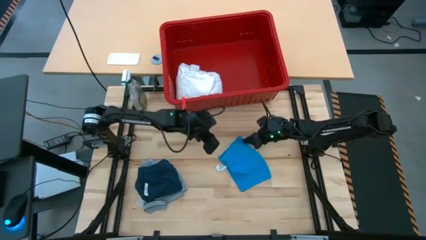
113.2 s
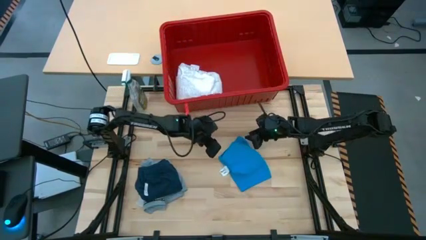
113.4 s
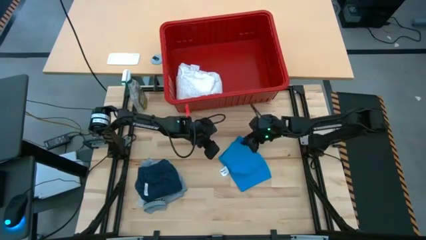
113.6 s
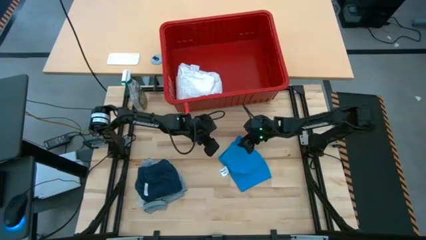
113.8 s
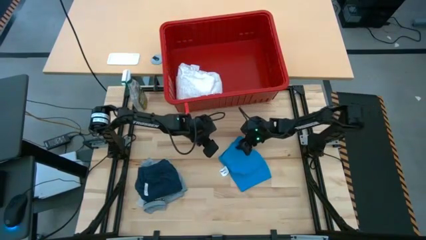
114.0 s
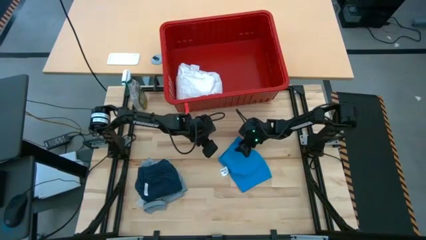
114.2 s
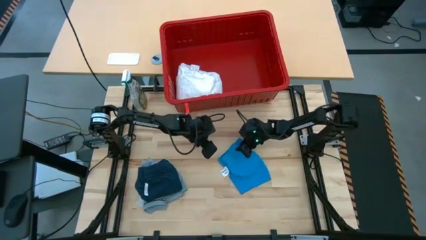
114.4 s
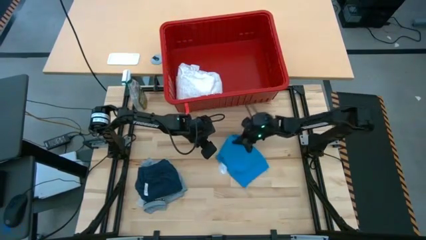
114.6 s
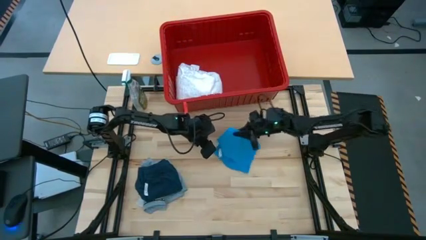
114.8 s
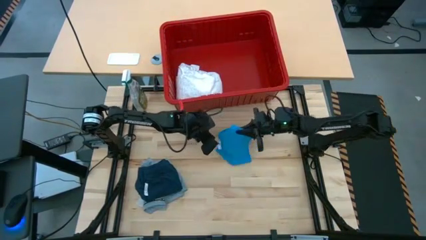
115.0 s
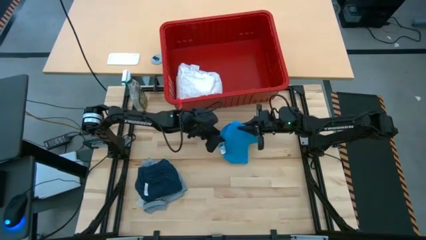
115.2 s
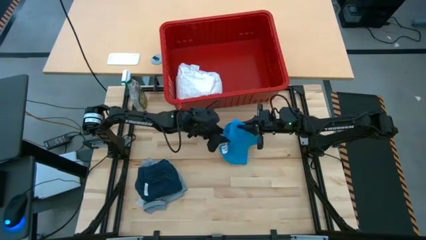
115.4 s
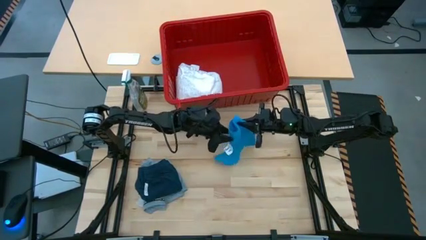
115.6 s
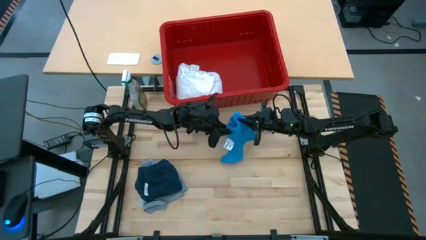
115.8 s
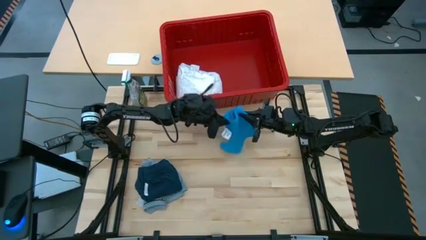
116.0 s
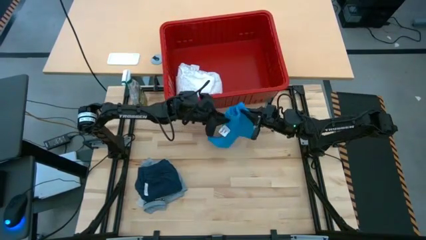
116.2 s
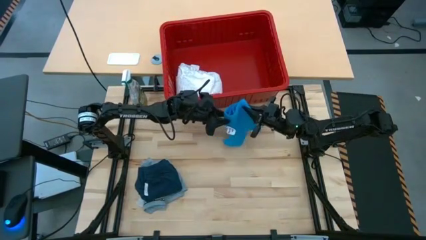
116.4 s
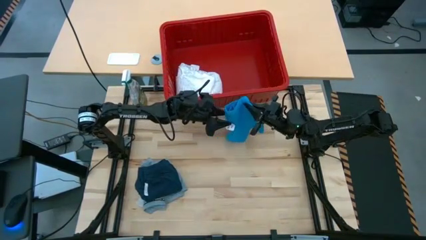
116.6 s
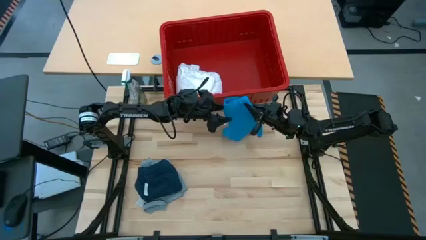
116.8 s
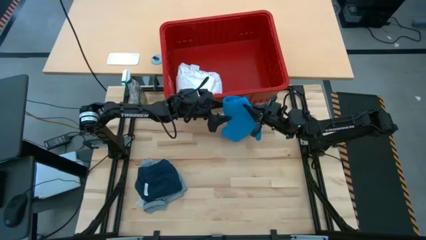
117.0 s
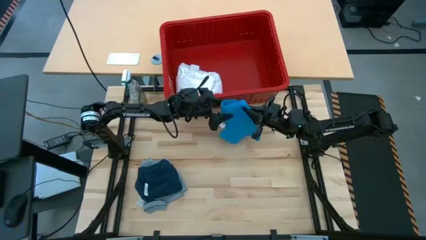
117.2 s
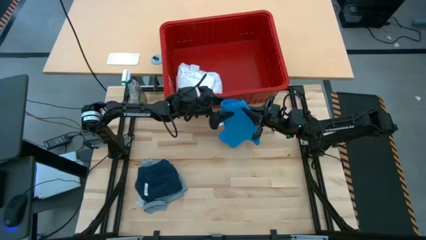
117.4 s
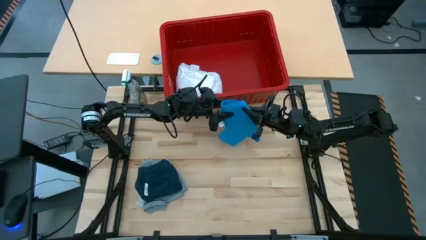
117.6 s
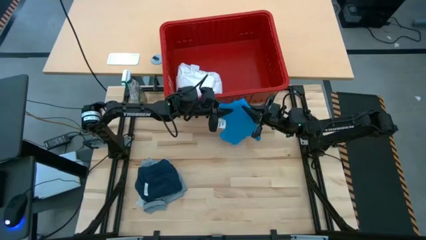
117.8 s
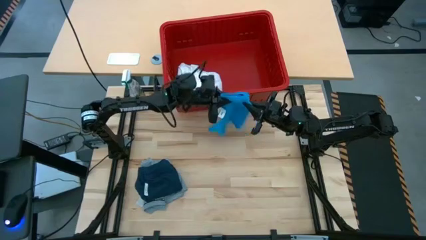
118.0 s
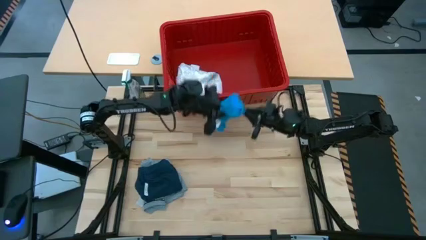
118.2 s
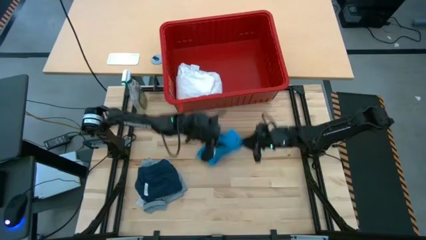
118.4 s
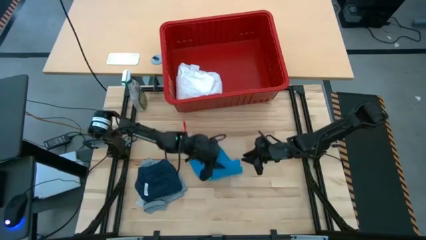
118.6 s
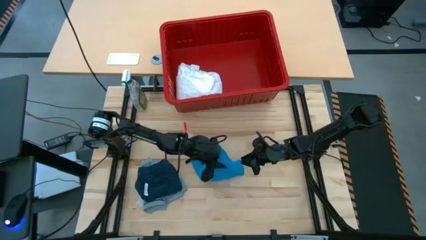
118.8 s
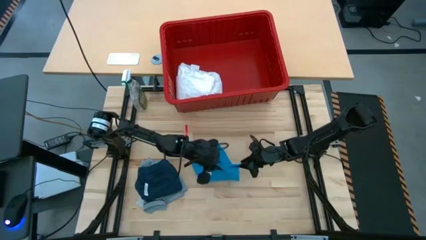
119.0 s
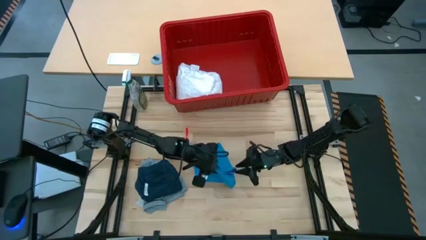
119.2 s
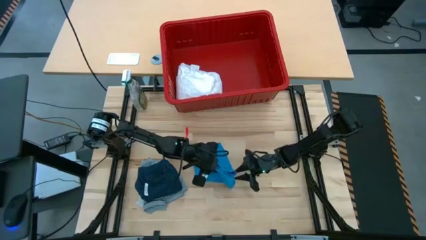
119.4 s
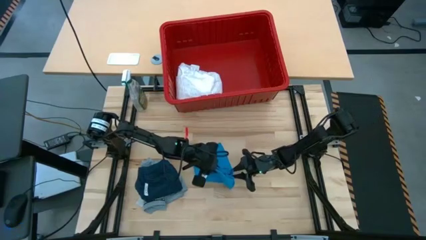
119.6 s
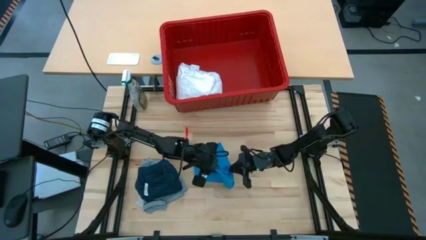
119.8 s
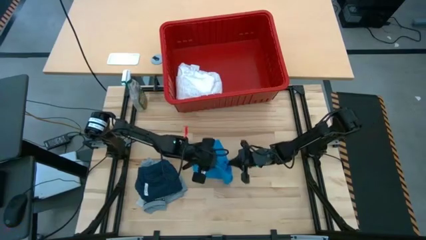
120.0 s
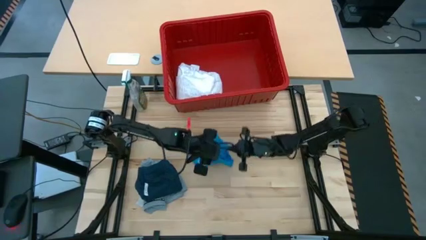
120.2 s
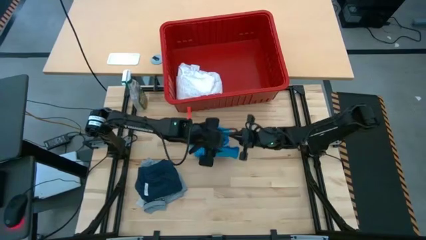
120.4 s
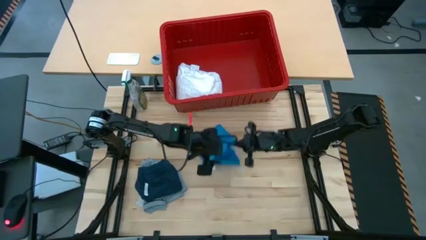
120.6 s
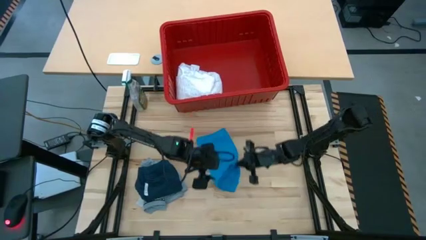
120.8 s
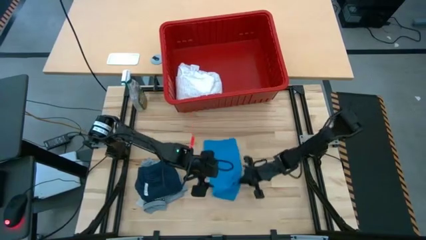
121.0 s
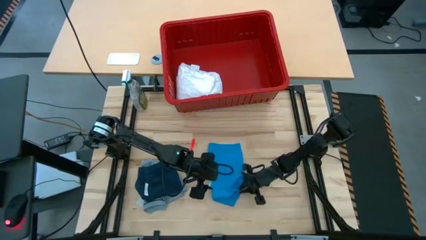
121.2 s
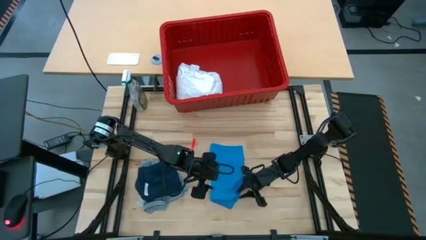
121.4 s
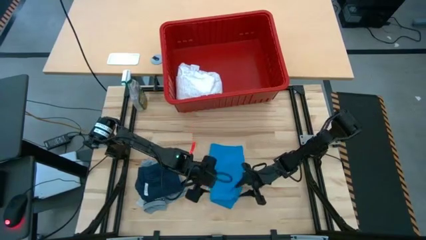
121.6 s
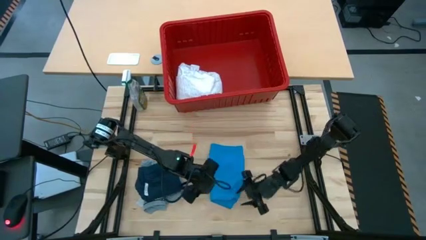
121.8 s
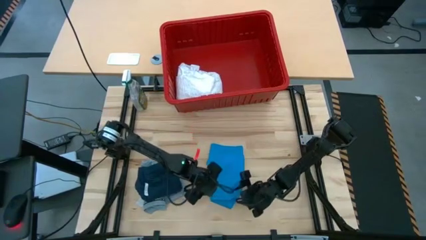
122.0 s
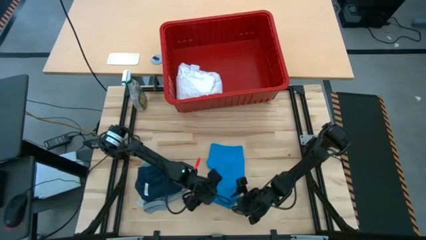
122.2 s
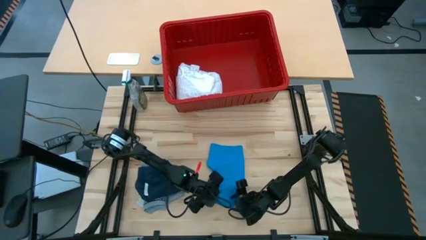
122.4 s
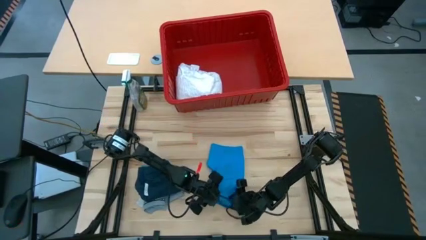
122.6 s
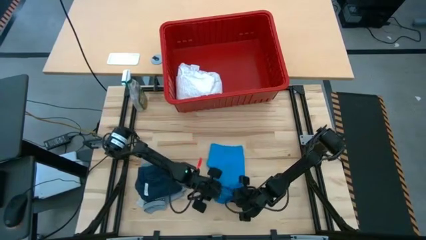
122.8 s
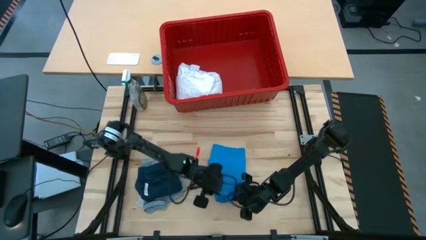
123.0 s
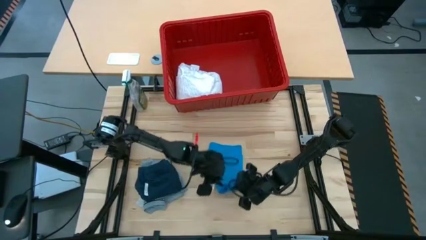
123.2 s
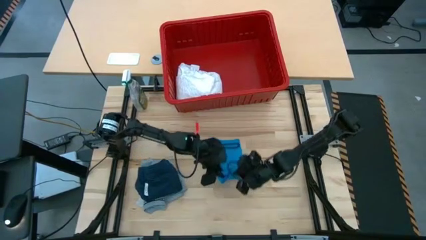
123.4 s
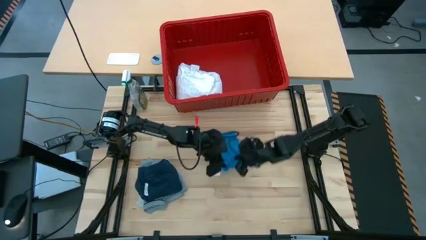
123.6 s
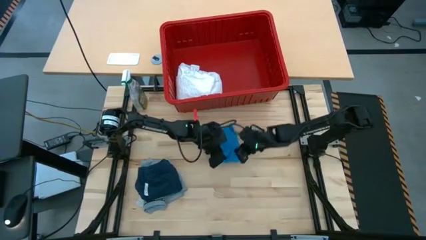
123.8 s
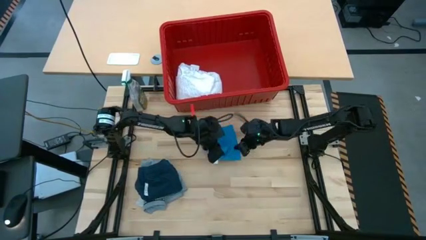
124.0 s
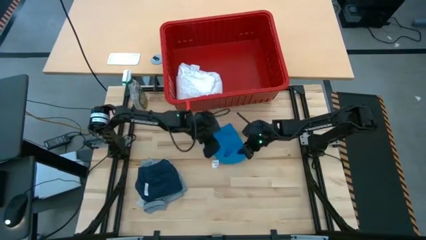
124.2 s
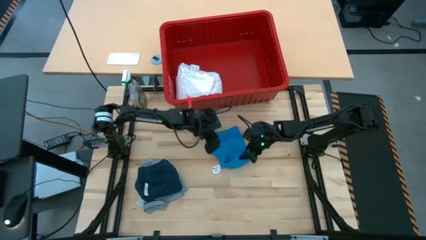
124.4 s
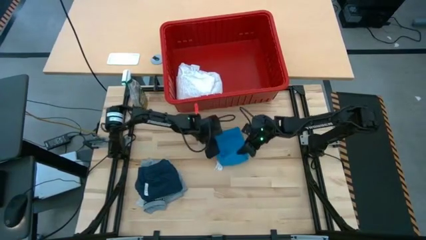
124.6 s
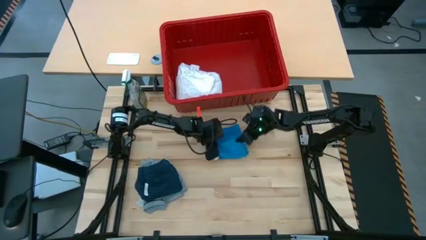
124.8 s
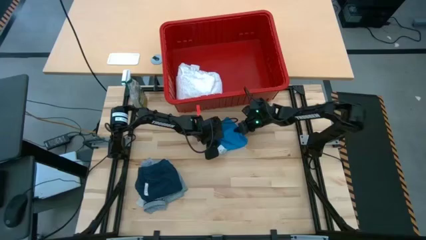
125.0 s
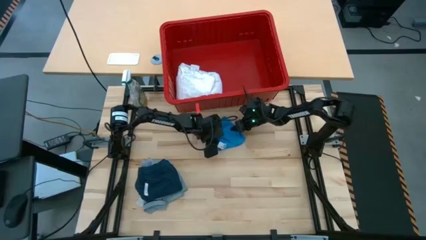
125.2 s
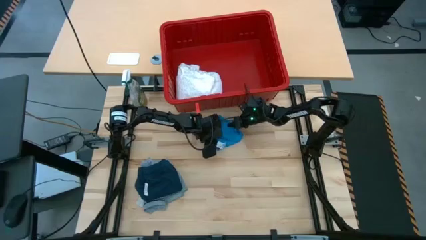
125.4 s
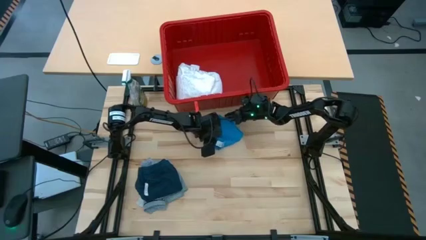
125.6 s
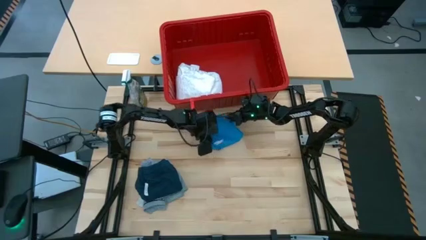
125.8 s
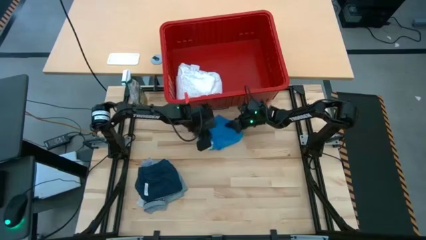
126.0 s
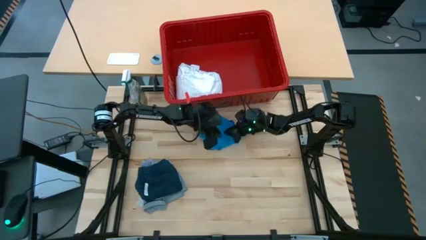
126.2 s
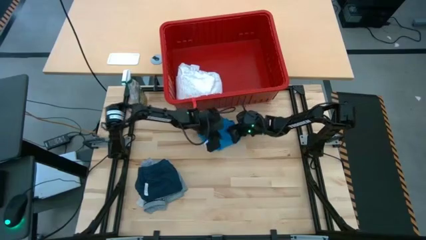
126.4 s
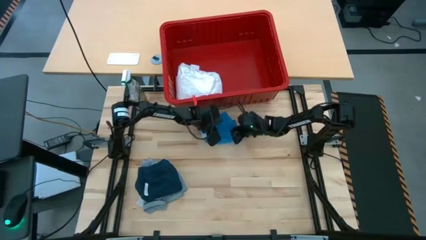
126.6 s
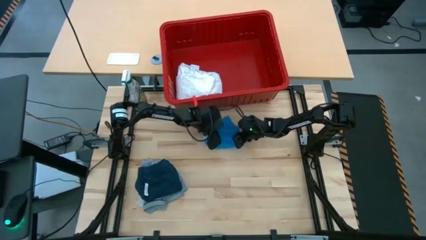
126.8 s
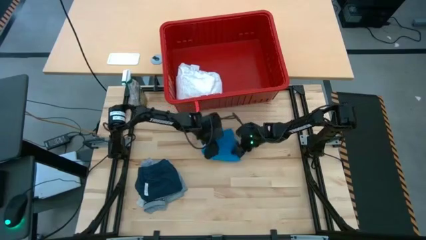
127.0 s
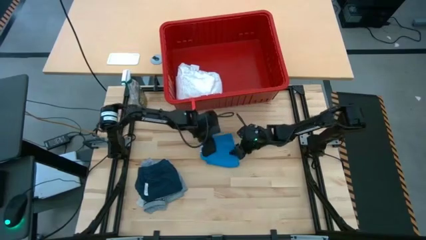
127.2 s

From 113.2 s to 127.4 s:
Task: Fold laundry
Fold the blue pants
